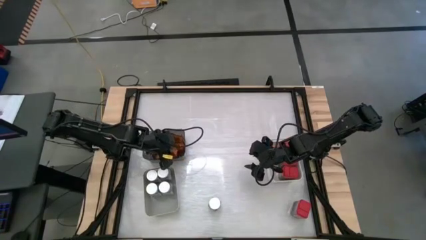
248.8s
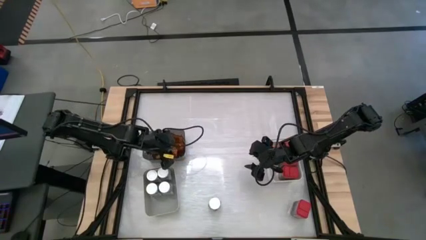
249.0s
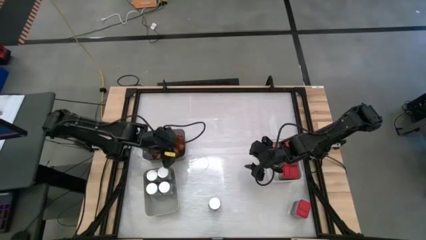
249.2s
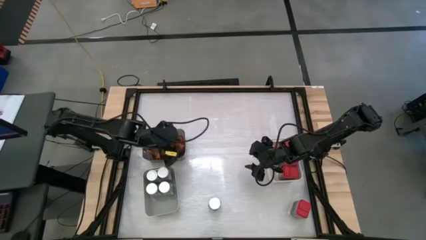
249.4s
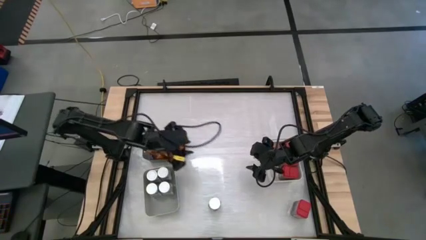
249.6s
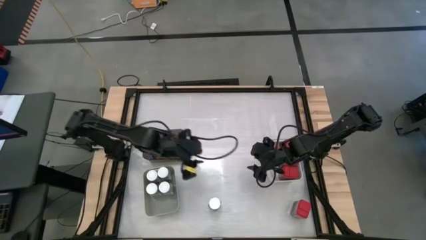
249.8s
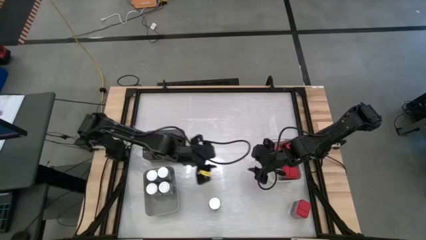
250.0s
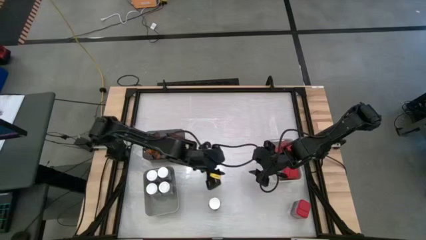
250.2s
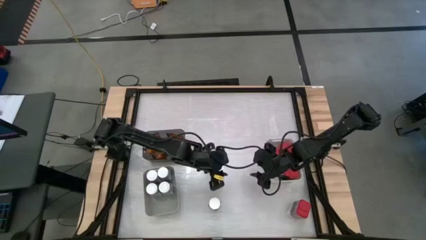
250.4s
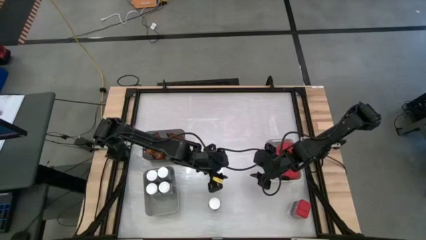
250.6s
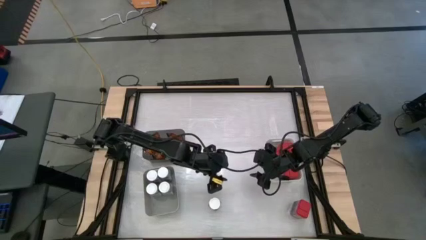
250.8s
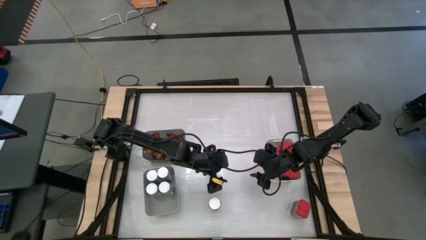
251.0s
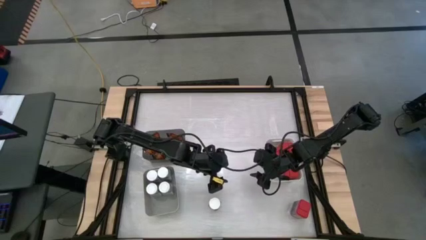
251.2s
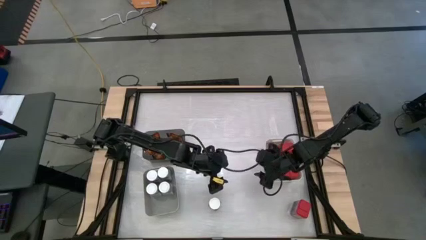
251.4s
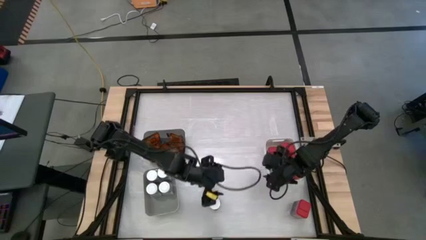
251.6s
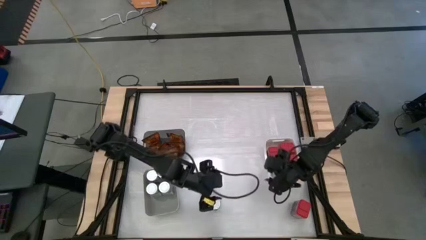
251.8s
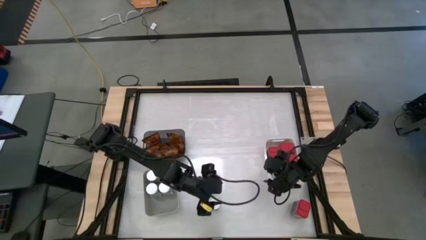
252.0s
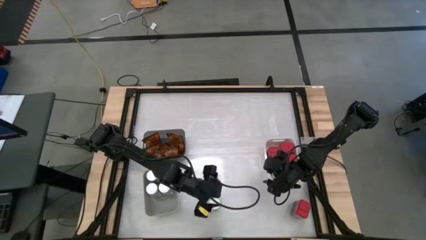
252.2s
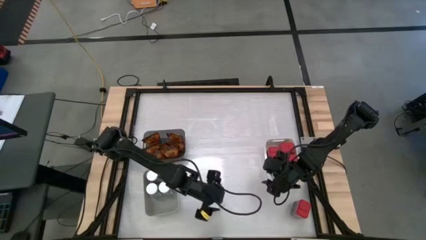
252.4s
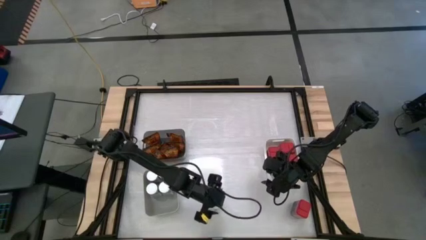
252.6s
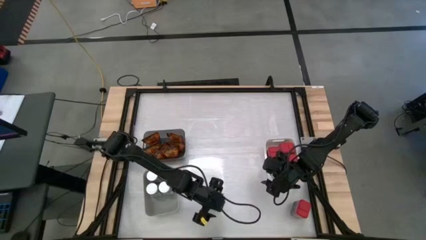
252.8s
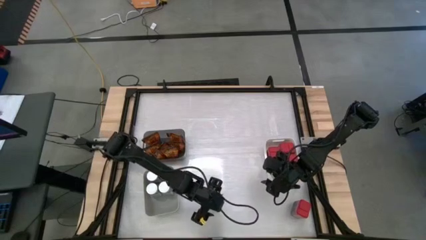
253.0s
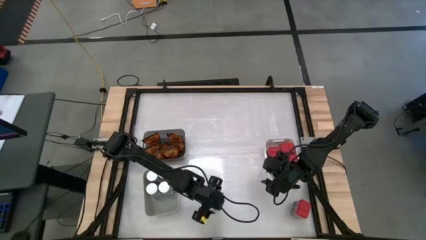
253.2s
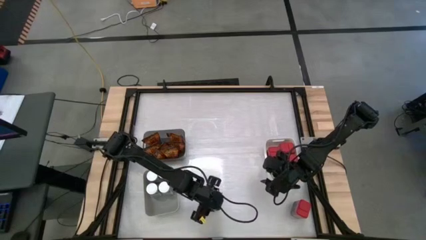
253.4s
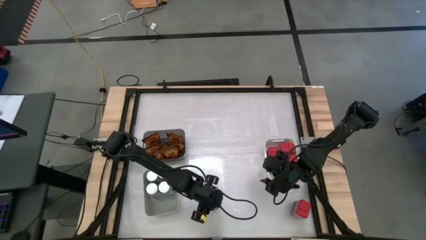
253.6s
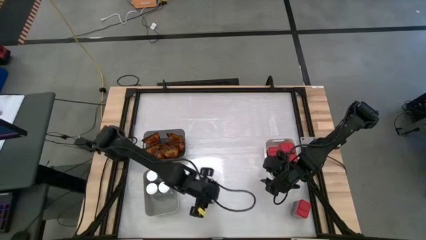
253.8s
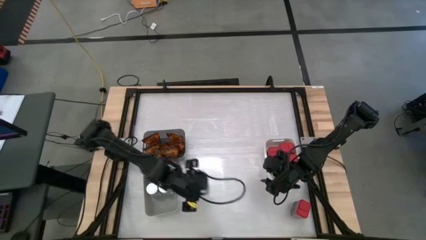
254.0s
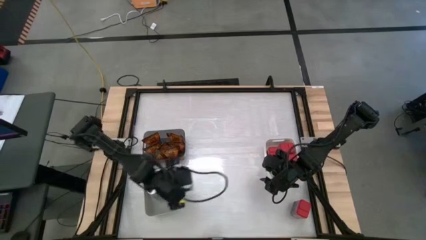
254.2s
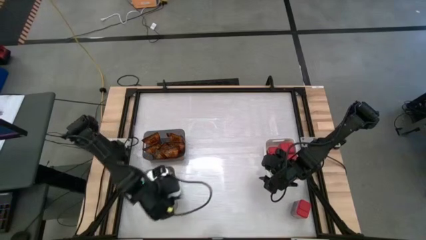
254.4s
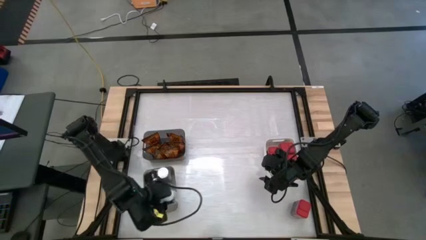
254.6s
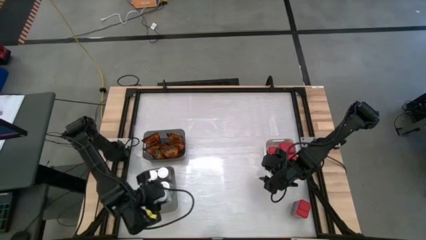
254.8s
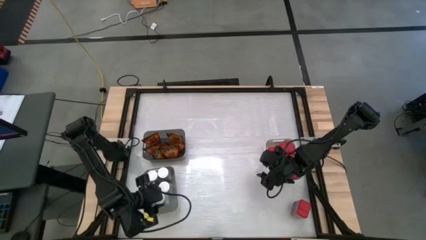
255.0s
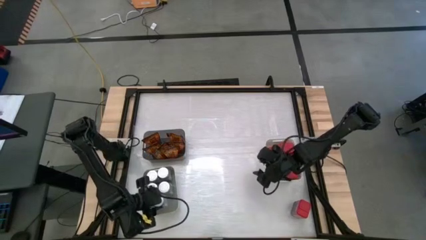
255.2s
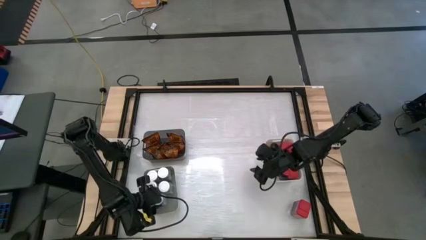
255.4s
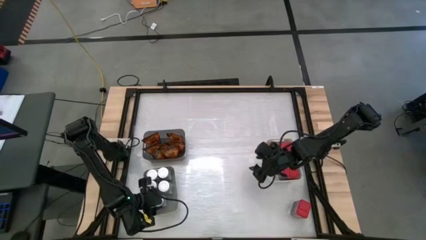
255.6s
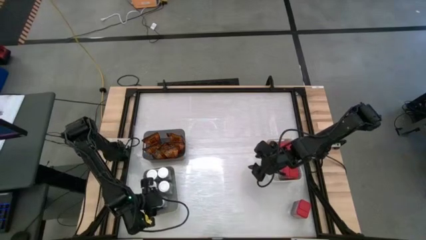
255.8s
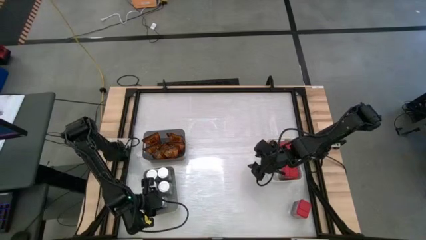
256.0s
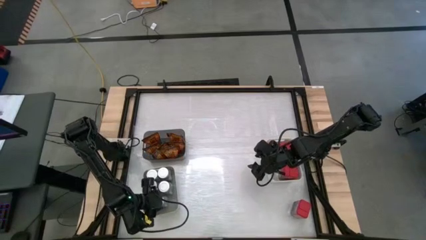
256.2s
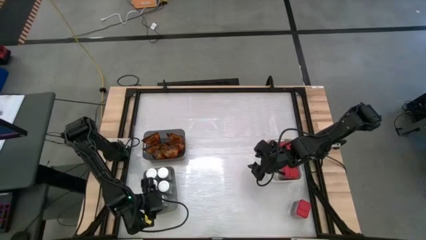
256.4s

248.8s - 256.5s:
Task: Sort spices by type
Put the white spice bottle into the gray bin

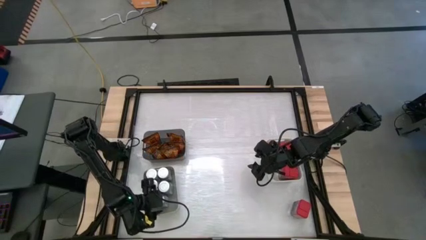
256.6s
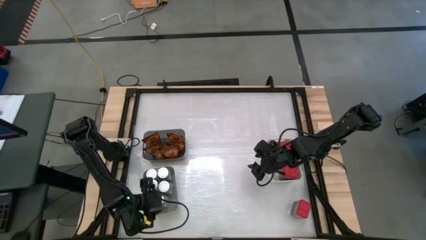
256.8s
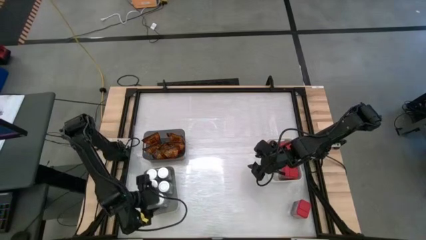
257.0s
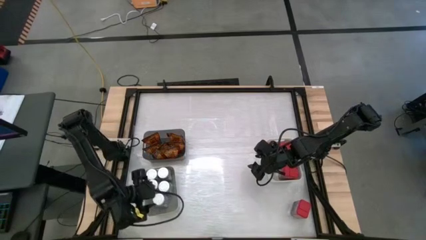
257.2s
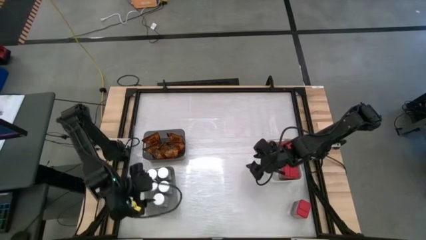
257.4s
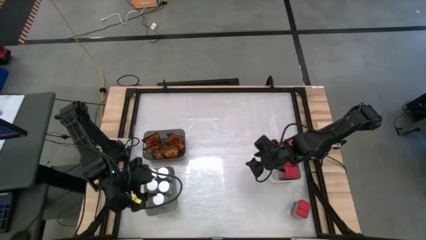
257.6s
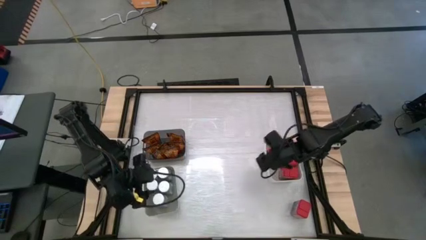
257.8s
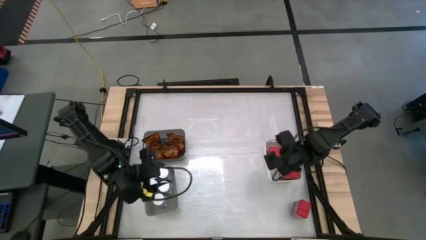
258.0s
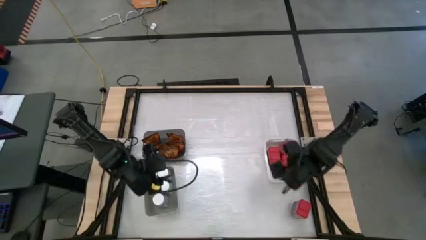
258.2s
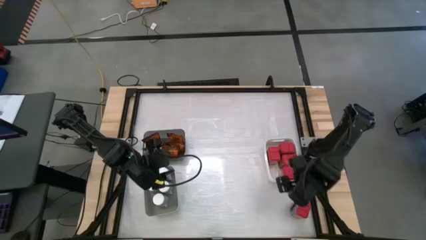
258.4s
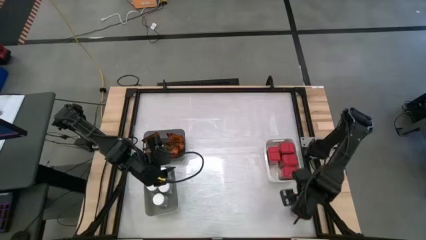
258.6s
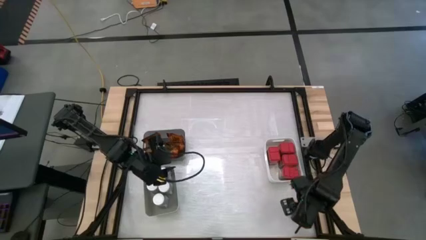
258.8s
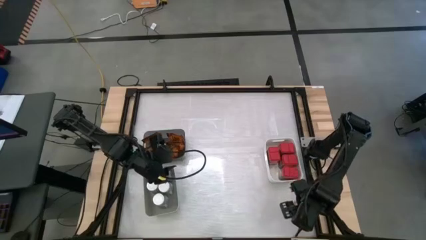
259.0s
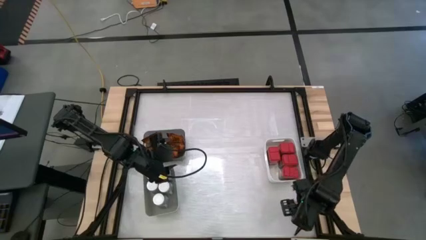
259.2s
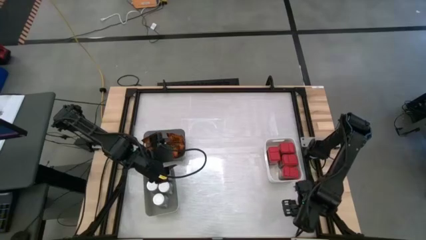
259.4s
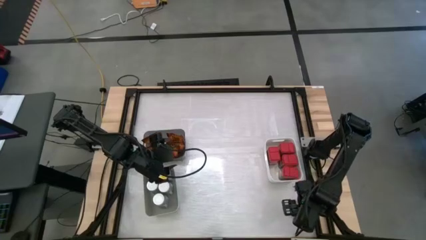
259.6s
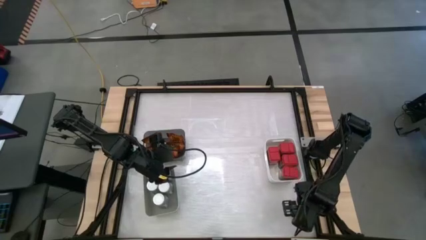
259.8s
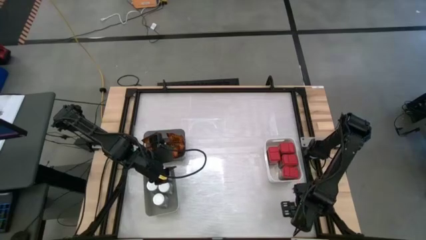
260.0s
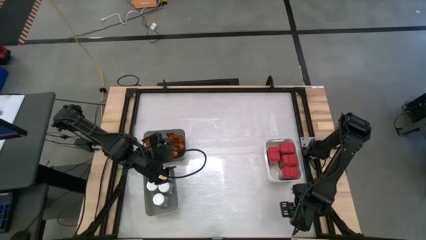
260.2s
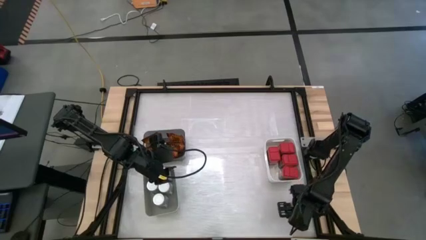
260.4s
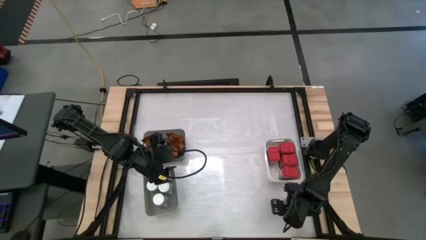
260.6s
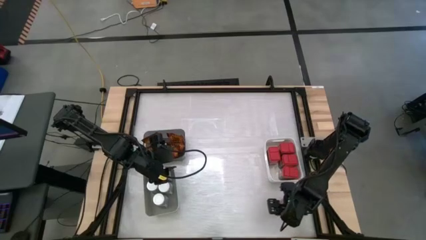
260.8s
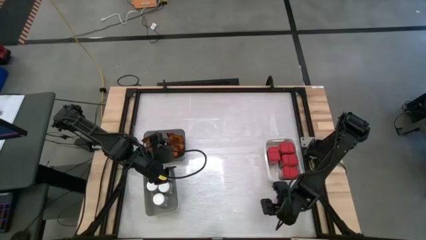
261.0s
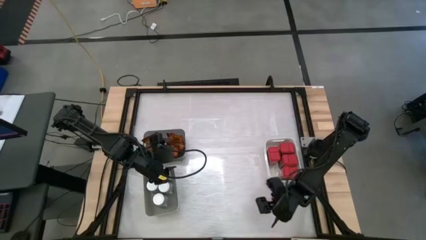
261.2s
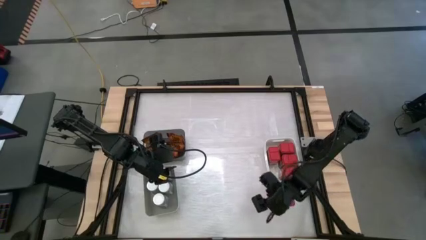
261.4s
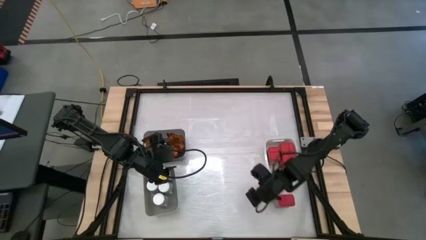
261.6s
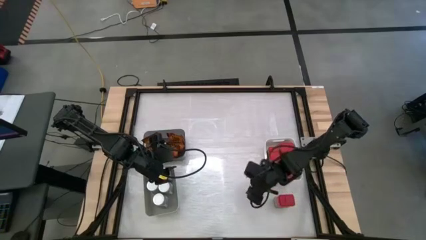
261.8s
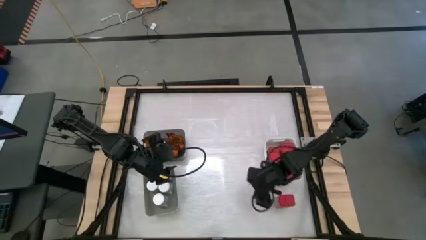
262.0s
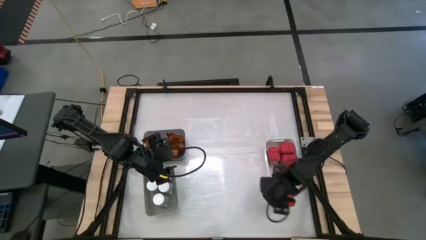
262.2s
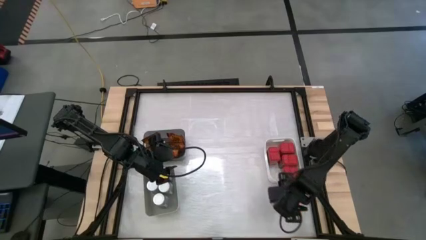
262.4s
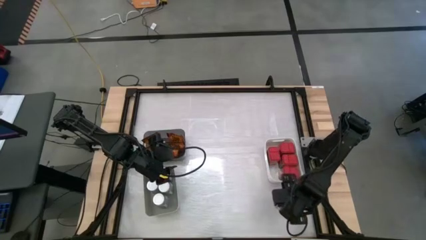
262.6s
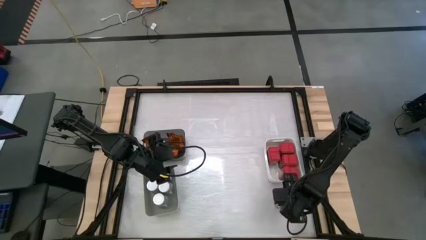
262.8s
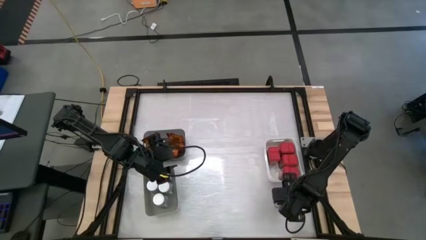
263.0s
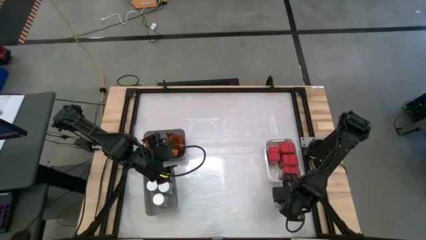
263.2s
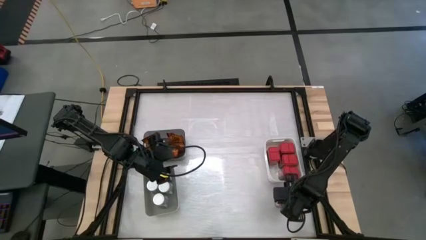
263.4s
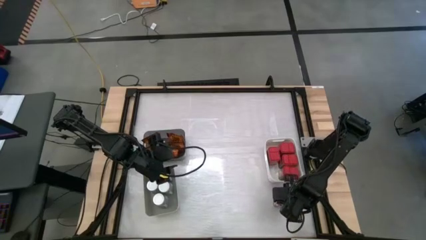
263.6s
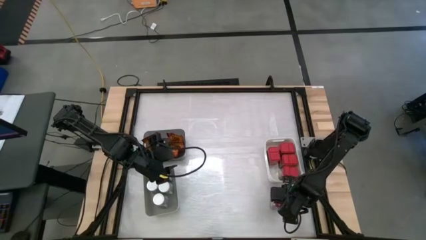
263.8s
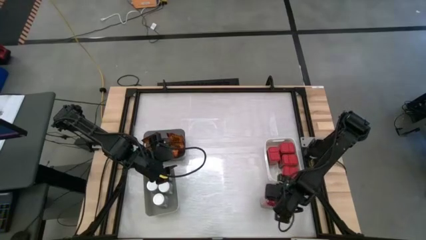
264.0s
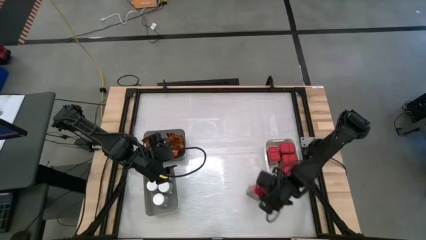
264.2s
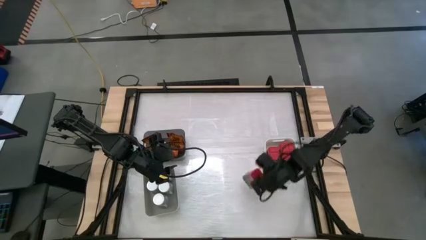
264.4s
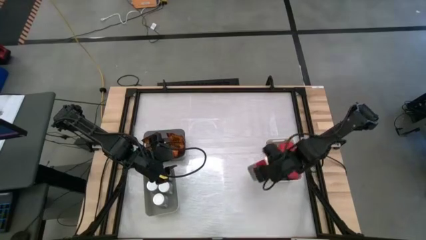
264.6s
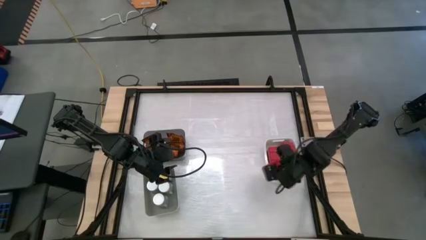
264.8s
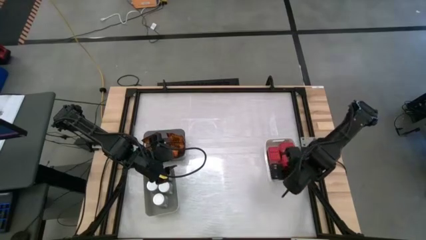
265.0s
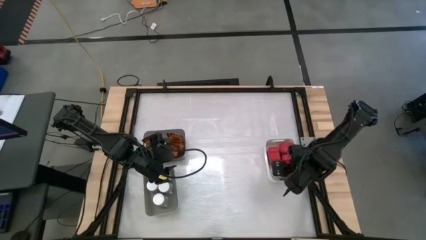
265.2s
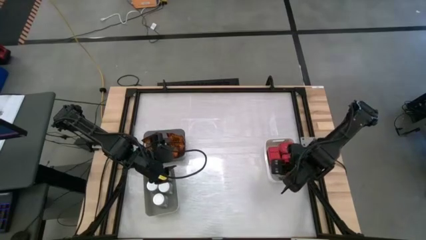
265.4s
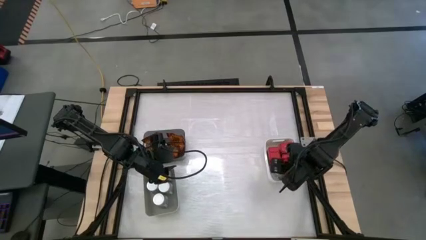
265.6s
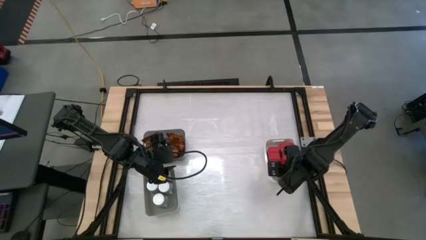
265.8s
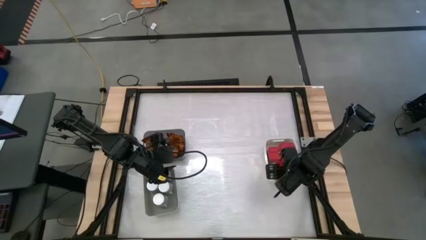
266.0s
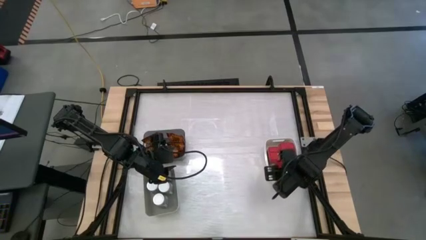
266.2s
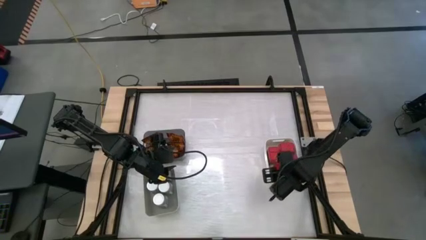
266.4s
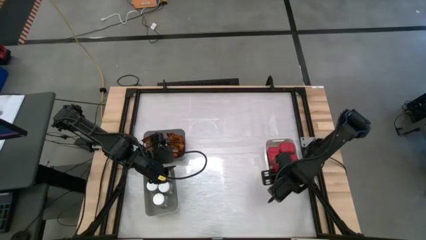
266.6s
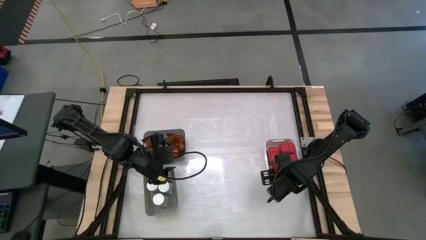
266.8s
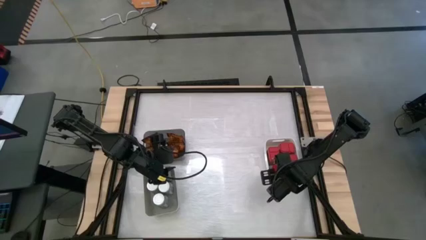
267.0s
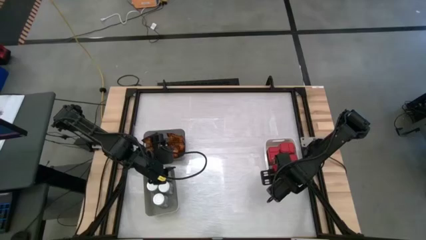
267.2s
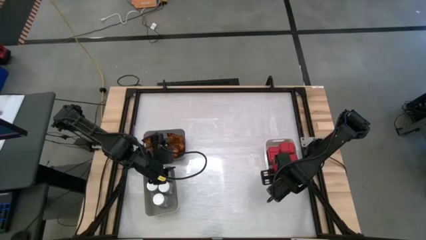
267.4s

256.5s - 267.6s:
Put the red spice can into the white bin
